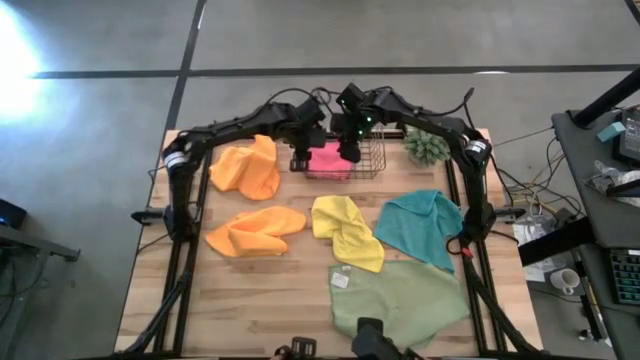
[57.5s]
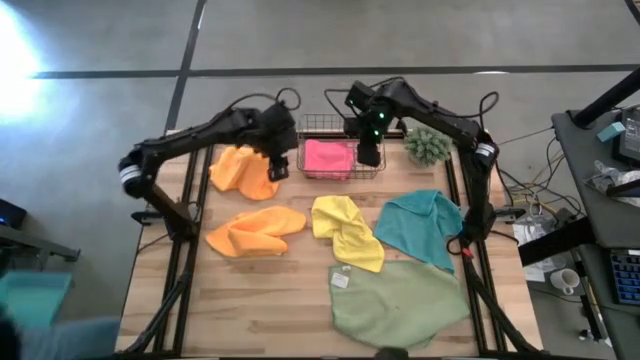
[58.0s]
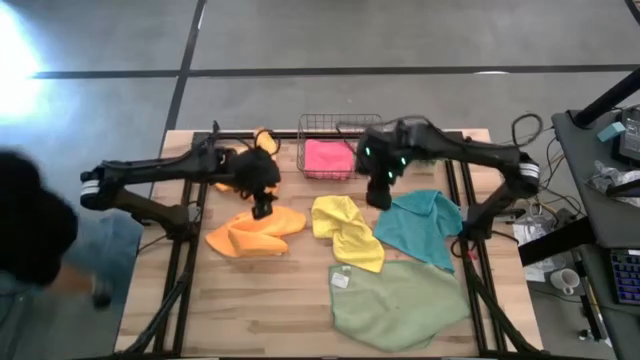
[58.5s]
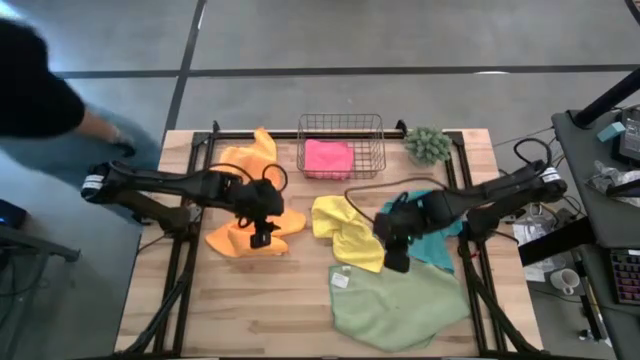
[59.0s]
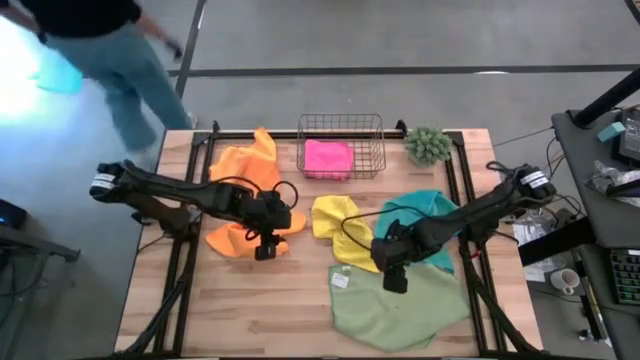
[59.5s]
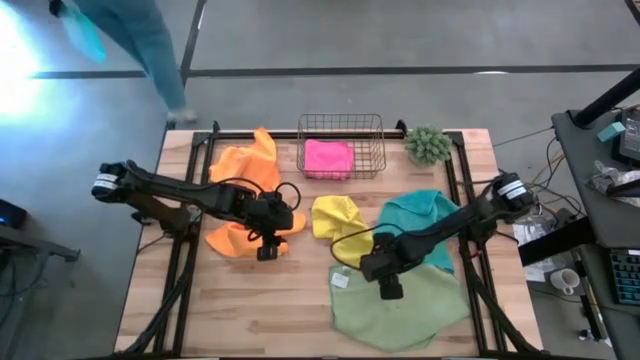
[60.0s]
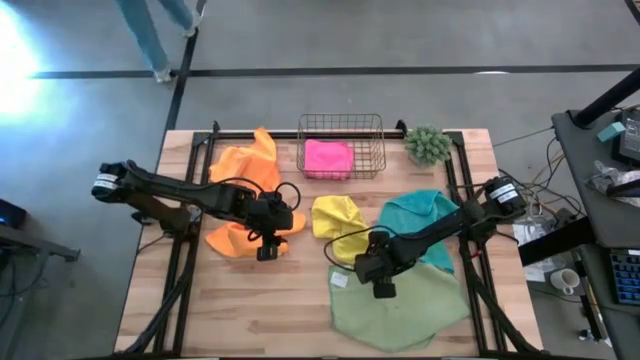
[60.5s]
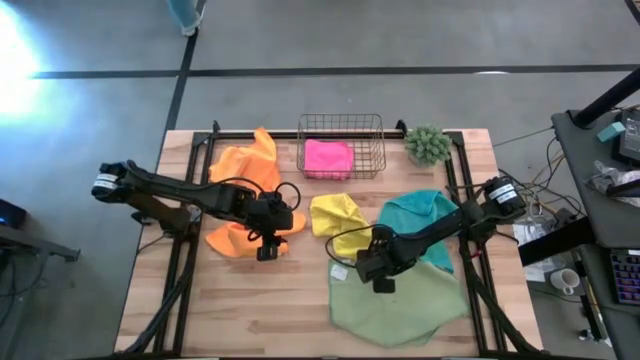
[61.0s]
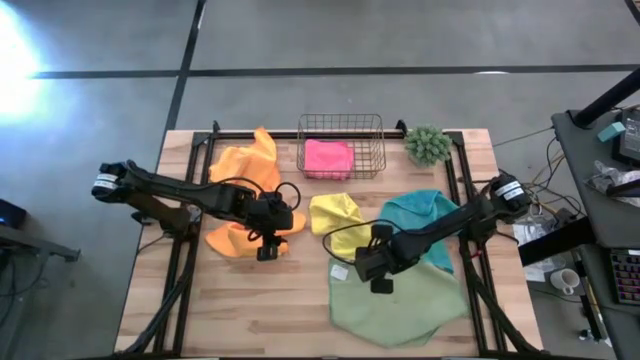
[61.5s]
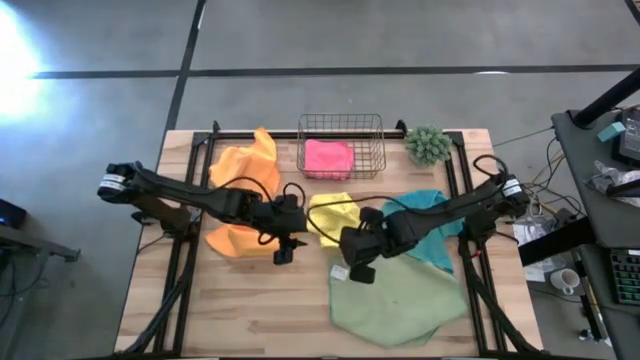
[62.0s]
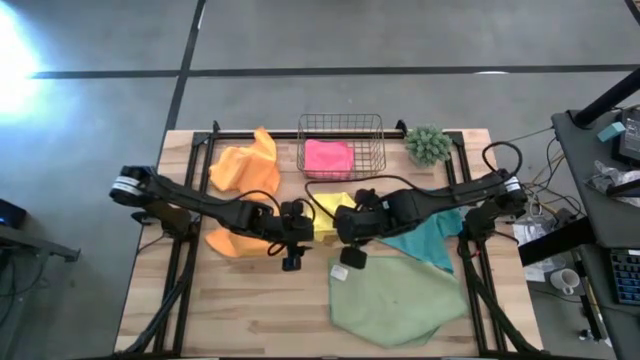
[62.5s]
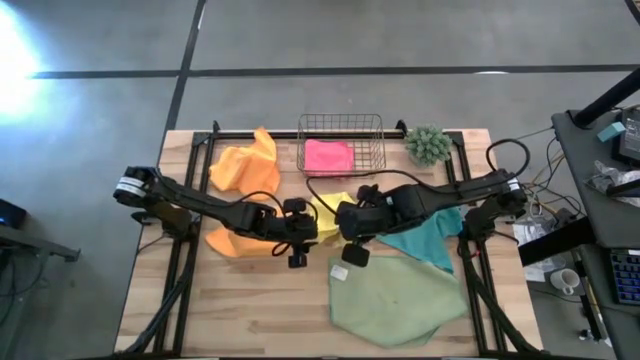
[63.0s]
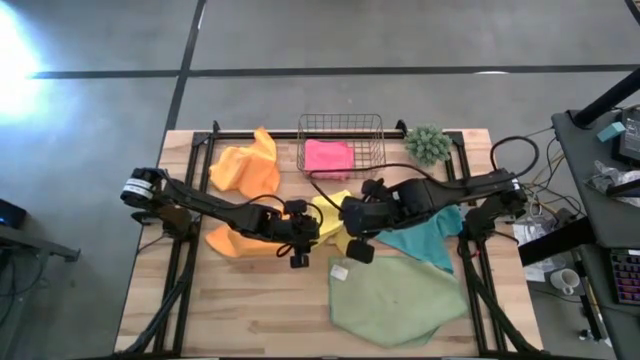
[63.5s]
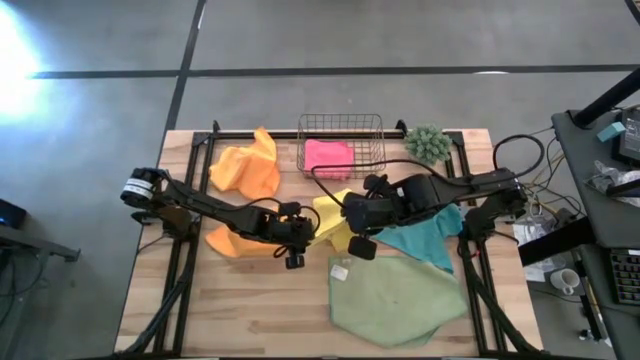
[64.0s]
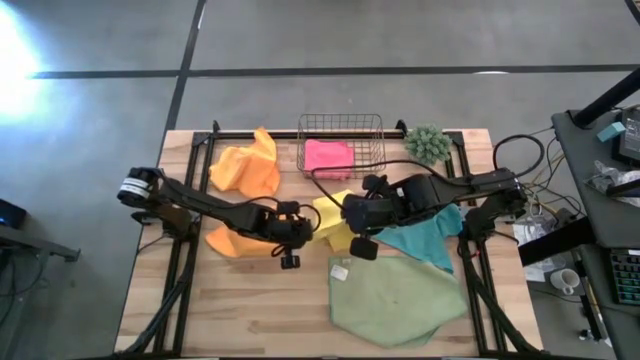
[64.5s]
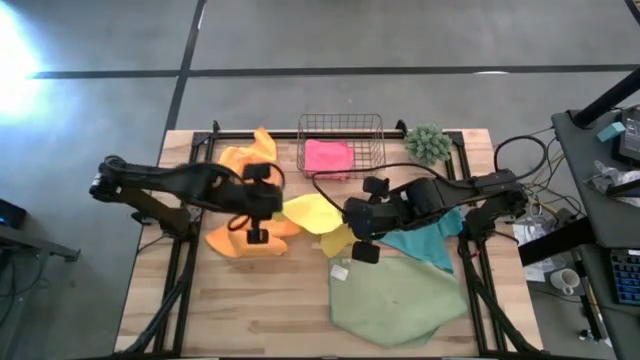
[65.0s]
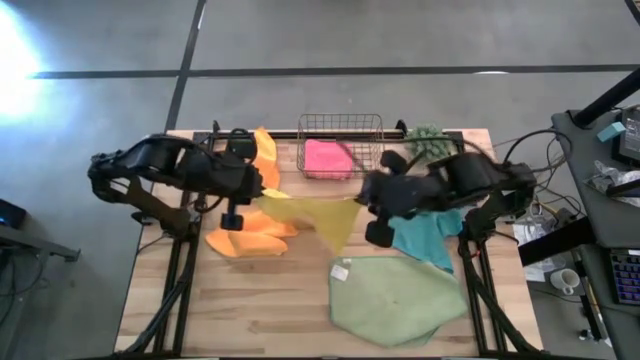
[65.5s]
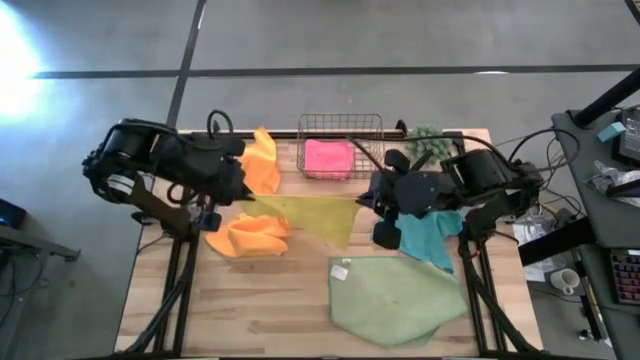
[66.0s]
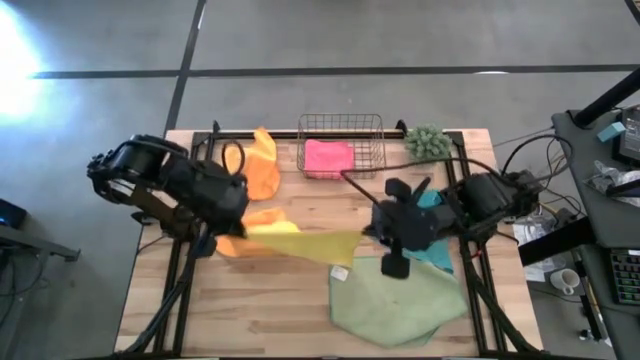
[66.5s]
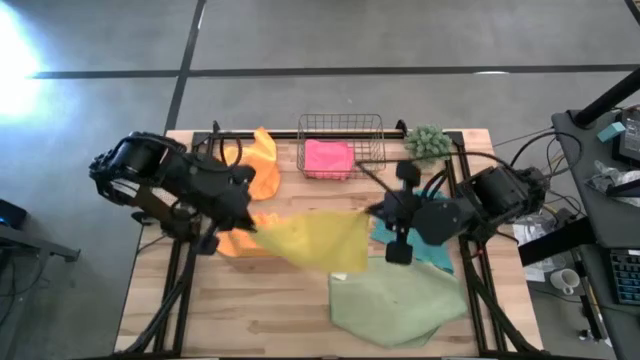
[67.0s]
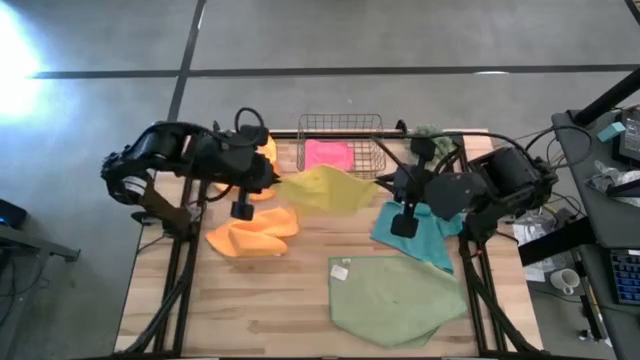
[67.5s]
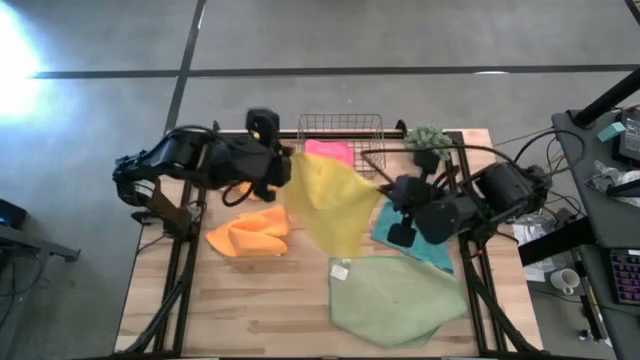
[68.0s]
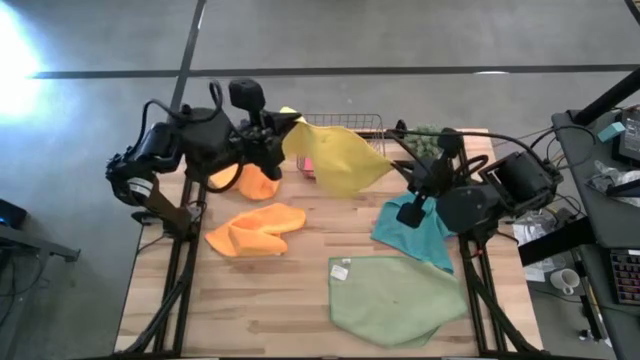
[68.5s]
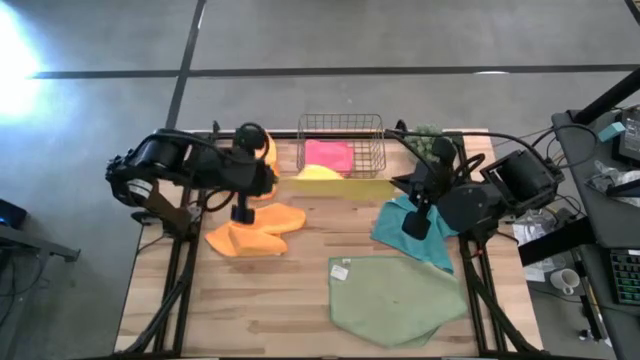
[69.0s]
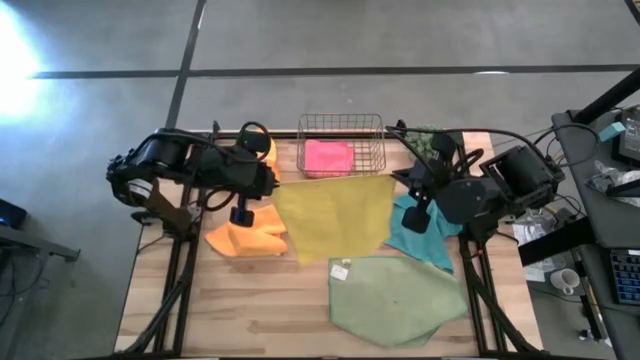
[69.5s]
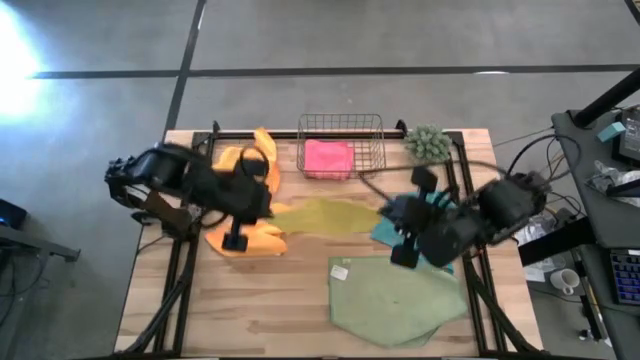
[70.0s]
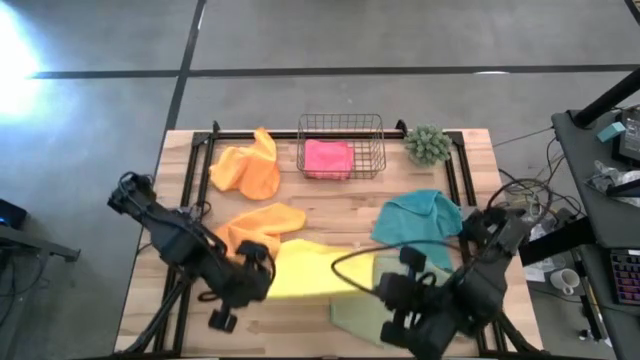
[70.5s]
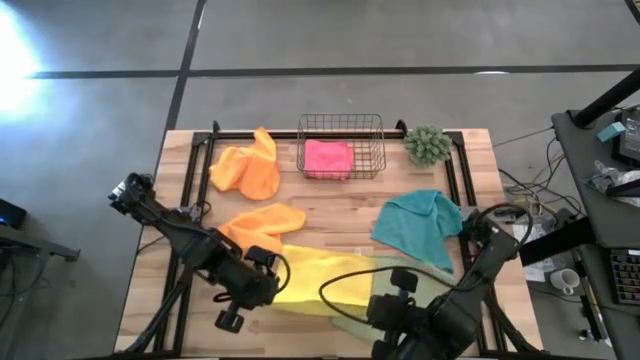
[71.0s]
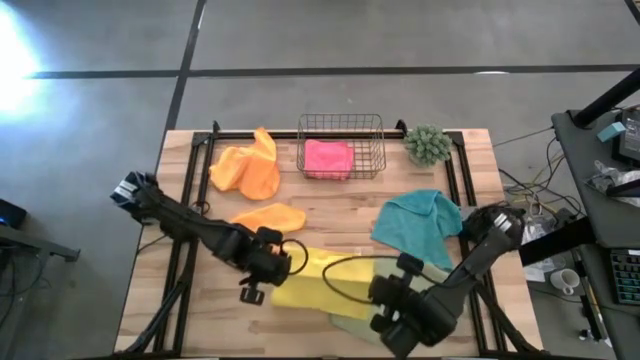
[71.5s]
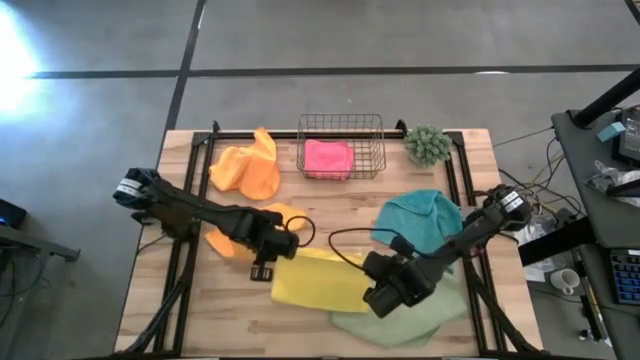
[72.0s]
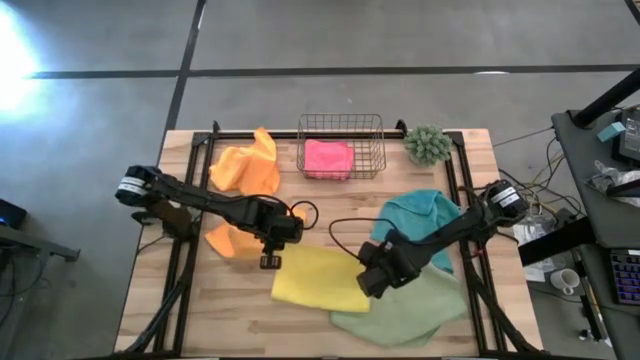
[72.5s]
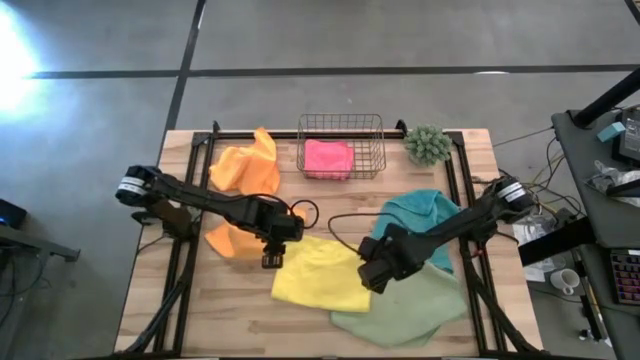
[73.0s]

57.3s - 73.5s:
Task: Fold microfiber towels
Fold the yellow microfiber cloth

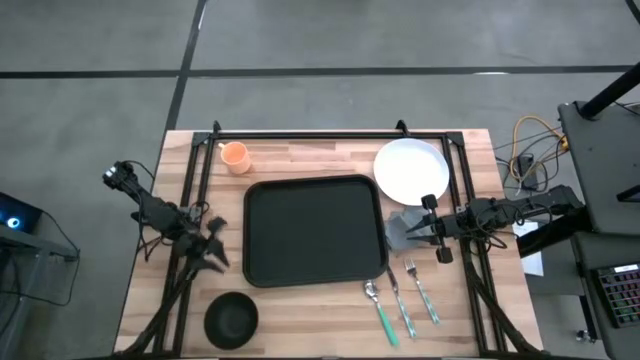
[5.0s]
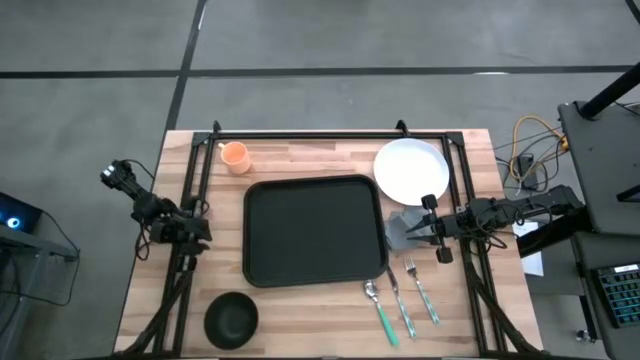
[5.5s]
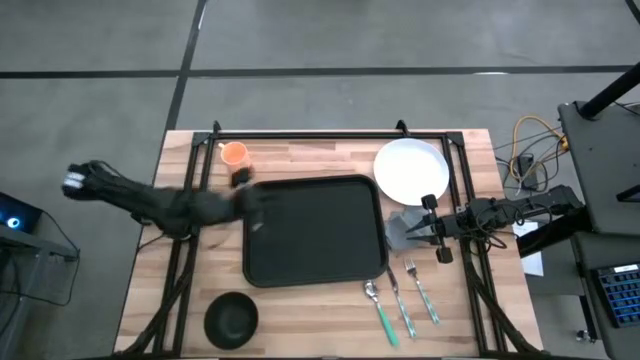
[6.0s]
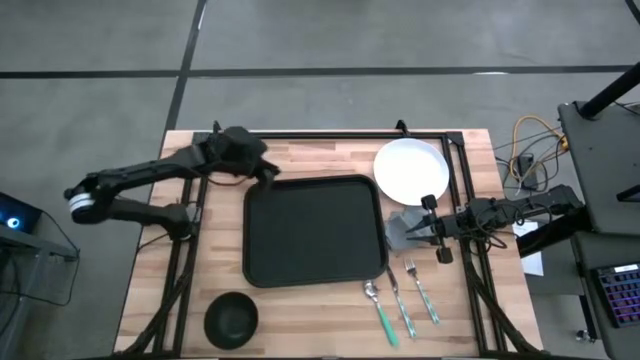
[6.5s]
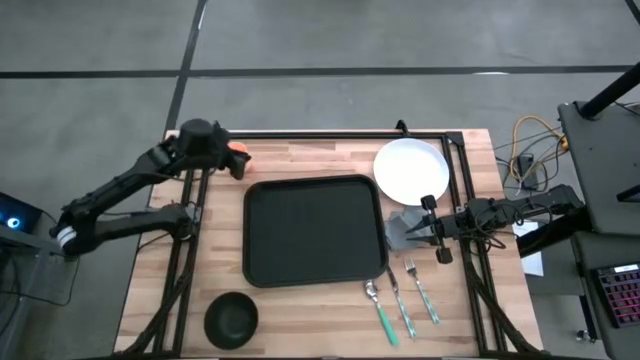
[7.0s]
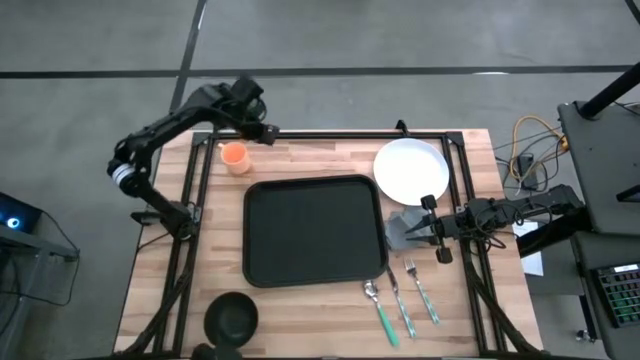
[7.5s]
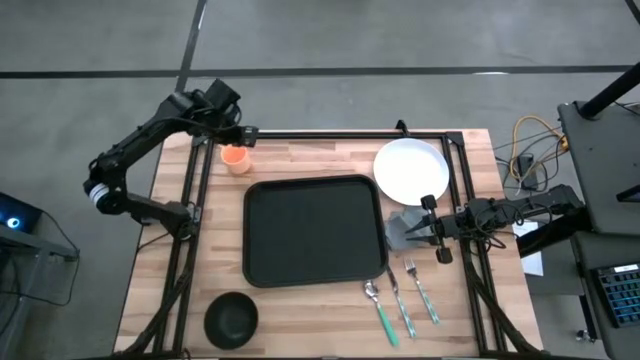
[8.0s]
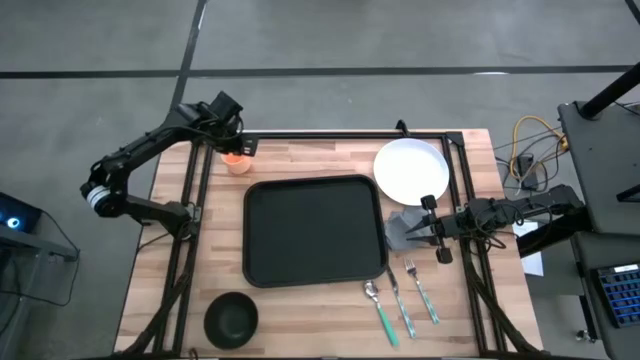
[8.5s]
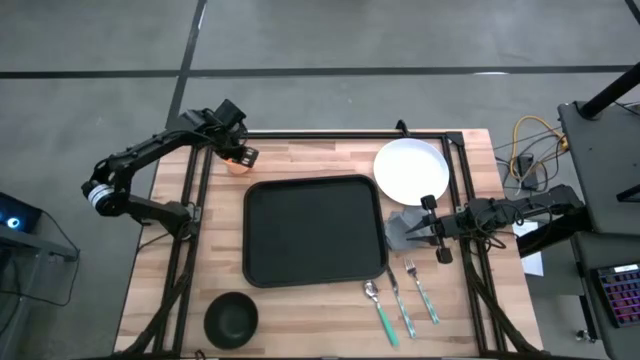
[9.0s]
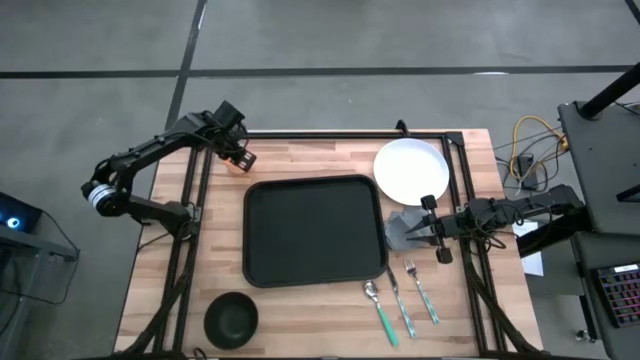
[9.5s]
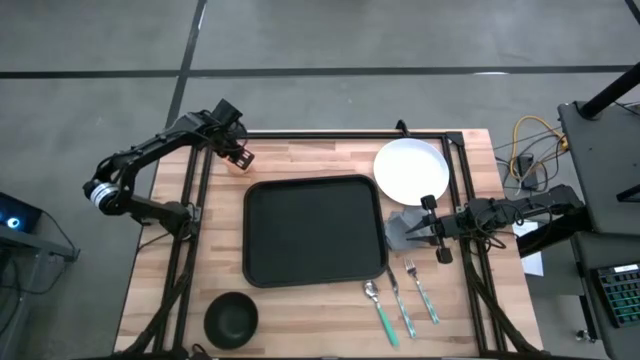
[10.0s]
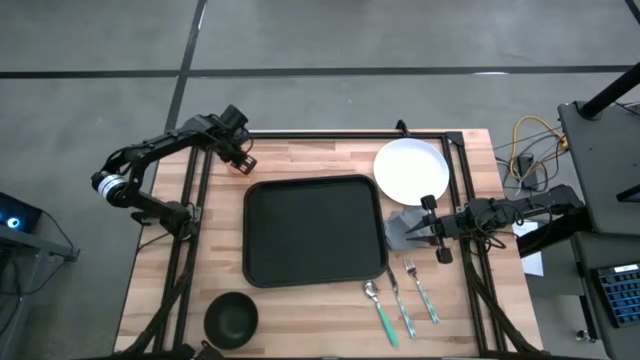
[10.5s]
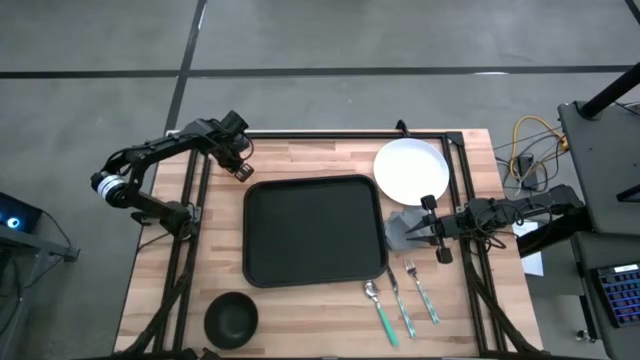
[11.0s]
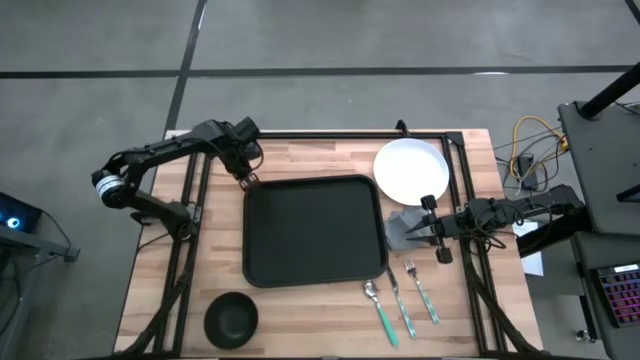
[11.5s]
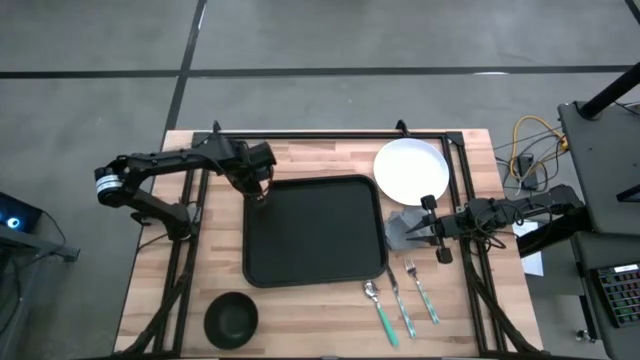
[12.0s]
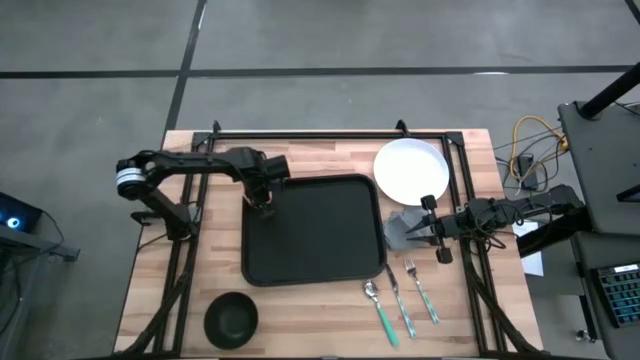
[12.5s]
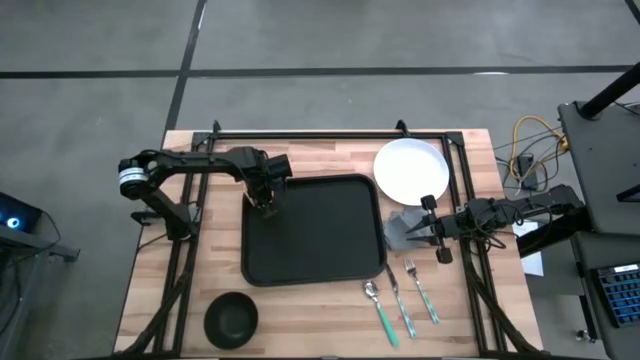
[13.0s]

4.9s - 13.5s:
Task: Set up tray
Put the light orange mug on the top left of the black tray
